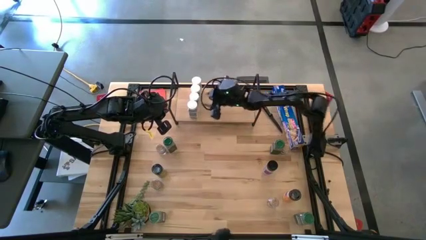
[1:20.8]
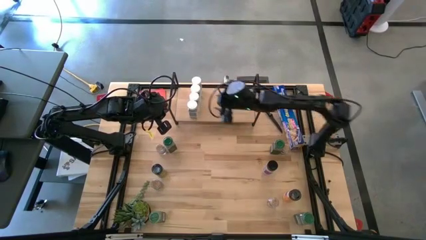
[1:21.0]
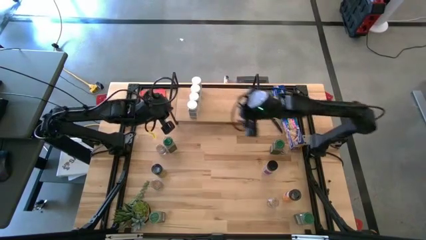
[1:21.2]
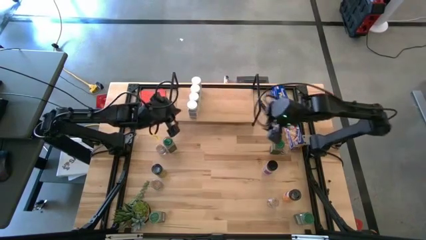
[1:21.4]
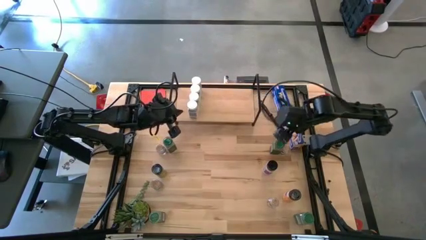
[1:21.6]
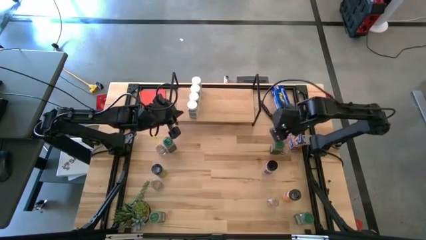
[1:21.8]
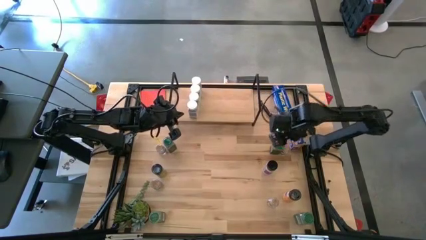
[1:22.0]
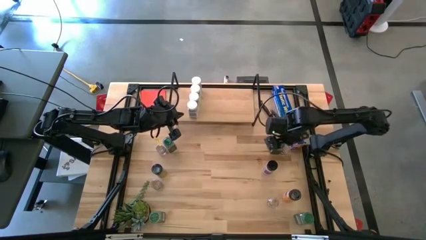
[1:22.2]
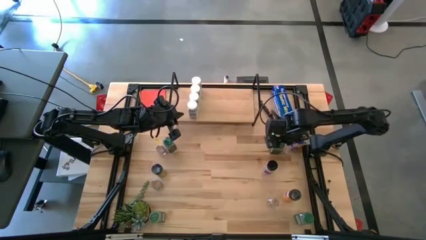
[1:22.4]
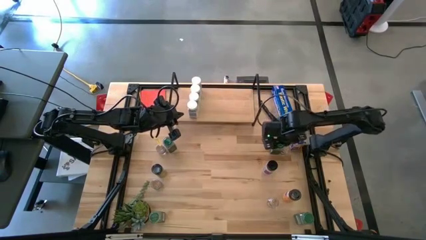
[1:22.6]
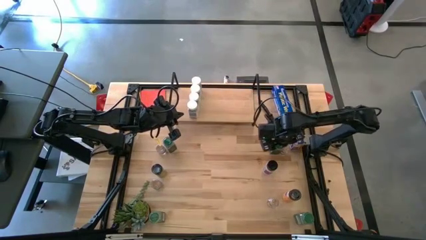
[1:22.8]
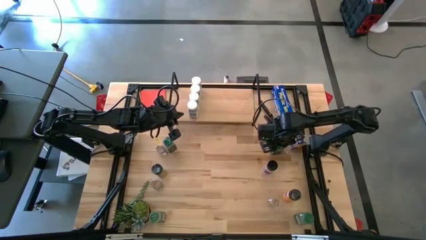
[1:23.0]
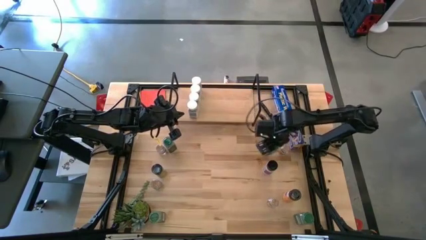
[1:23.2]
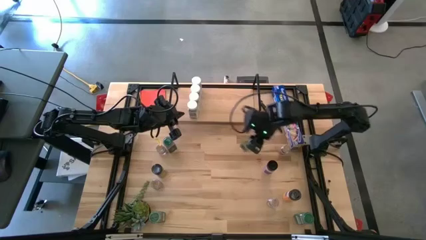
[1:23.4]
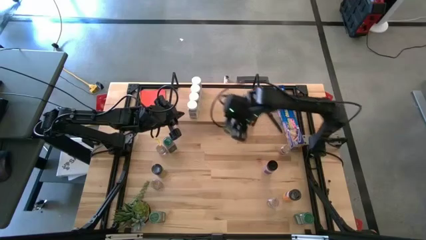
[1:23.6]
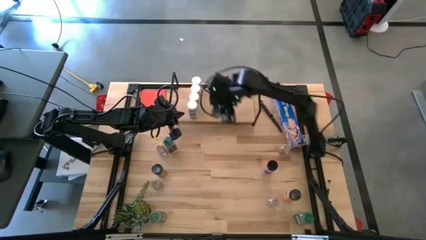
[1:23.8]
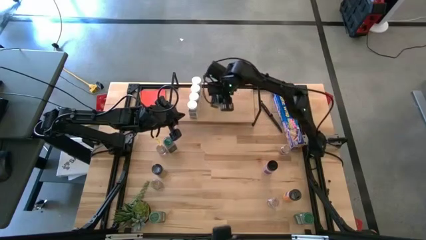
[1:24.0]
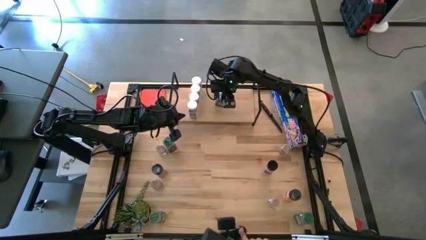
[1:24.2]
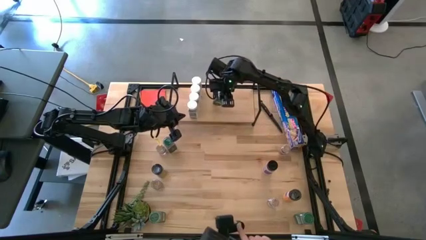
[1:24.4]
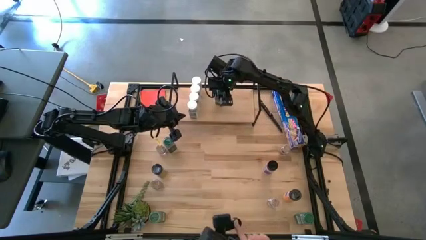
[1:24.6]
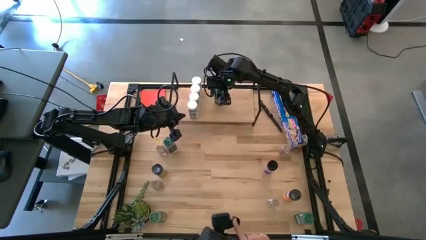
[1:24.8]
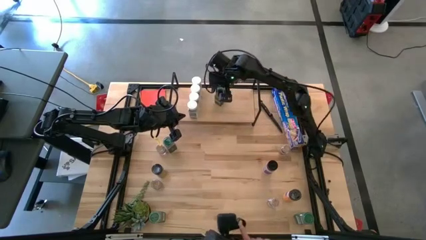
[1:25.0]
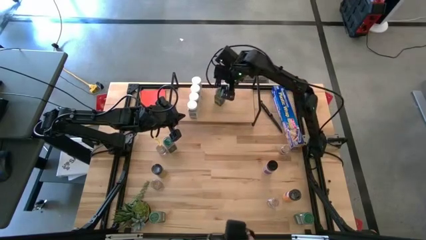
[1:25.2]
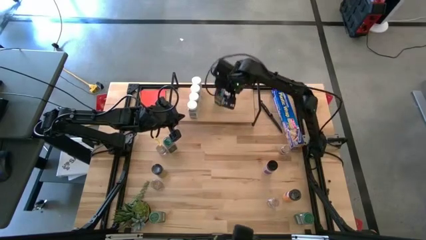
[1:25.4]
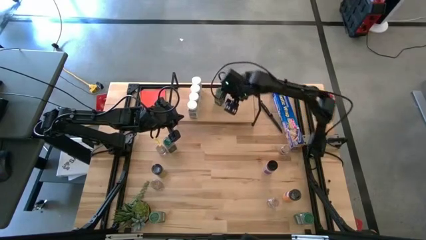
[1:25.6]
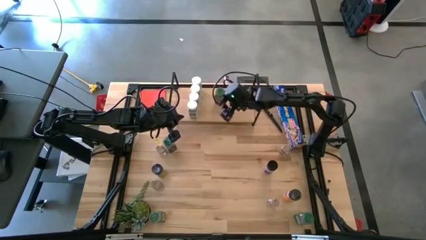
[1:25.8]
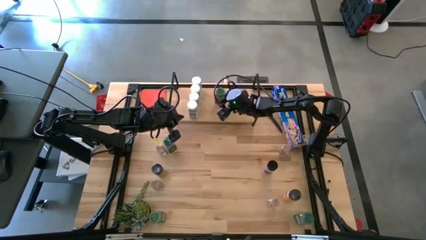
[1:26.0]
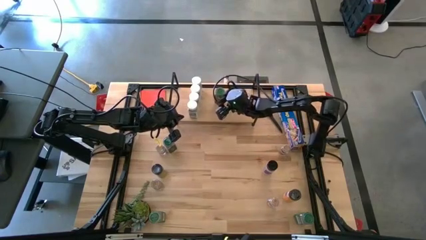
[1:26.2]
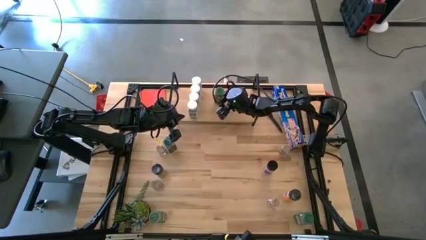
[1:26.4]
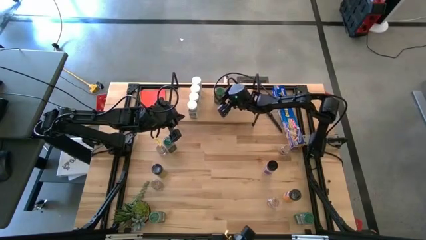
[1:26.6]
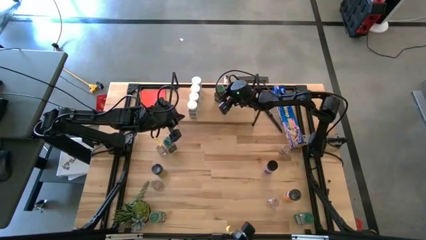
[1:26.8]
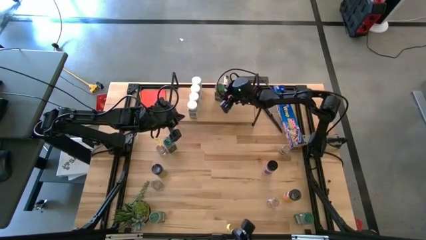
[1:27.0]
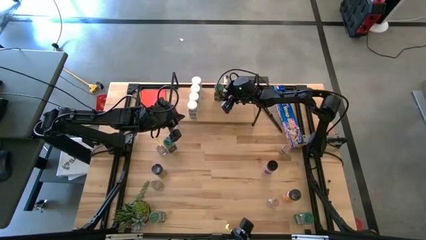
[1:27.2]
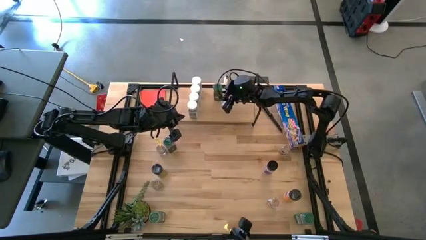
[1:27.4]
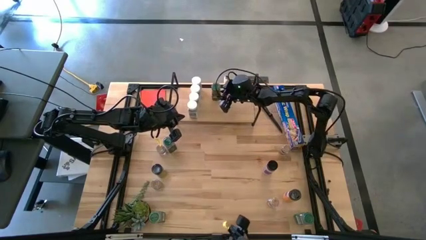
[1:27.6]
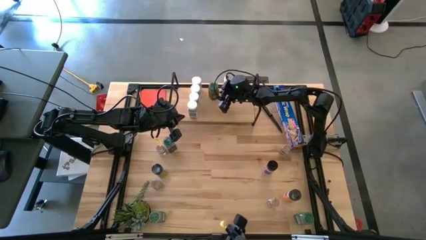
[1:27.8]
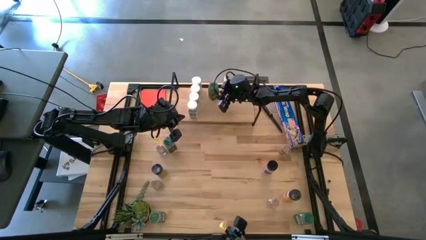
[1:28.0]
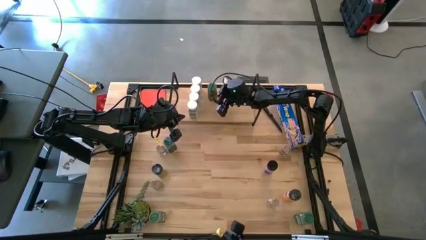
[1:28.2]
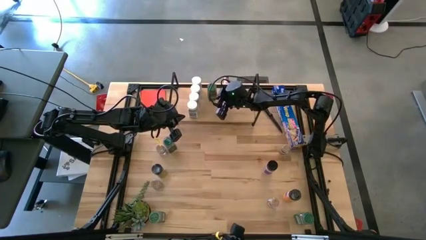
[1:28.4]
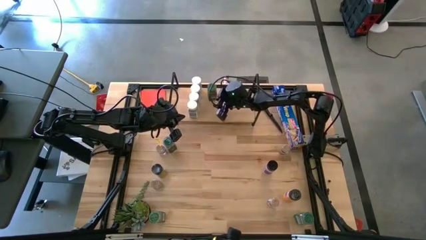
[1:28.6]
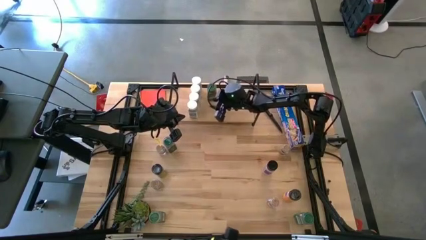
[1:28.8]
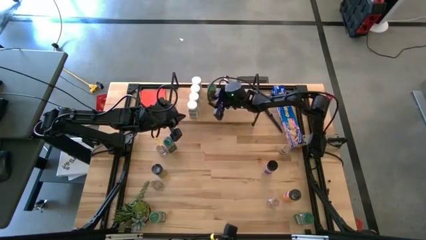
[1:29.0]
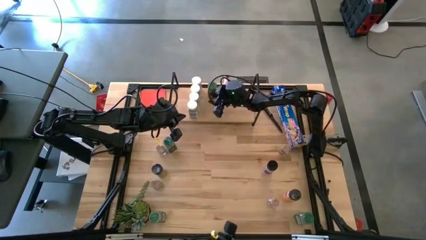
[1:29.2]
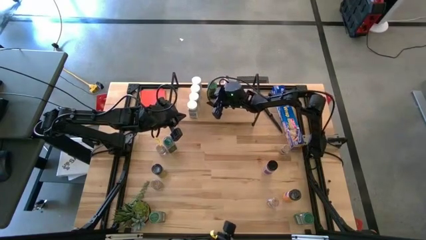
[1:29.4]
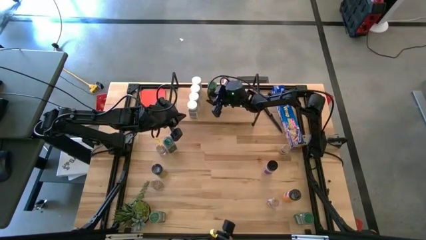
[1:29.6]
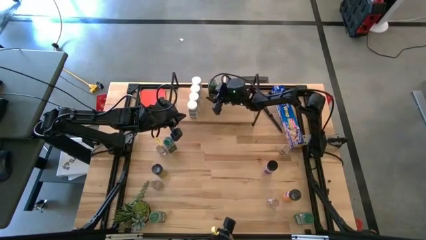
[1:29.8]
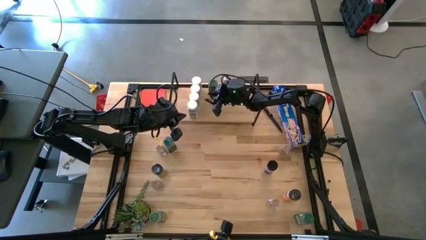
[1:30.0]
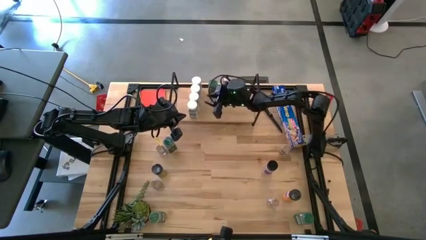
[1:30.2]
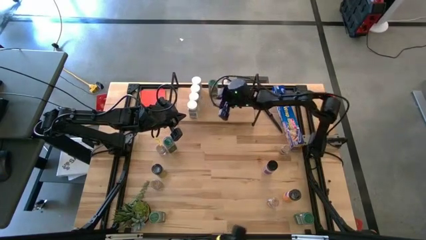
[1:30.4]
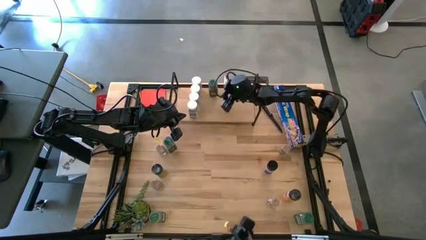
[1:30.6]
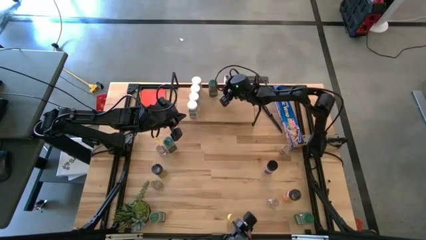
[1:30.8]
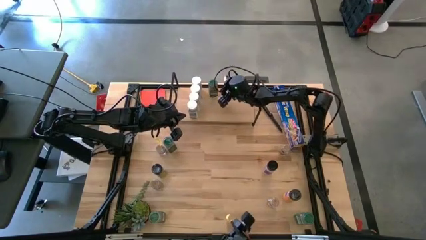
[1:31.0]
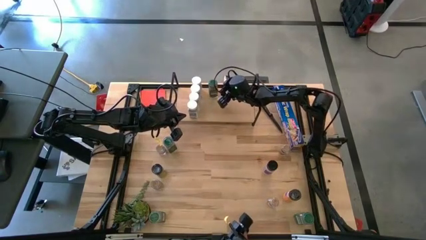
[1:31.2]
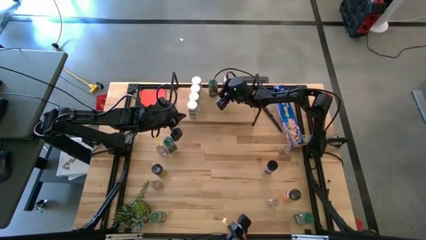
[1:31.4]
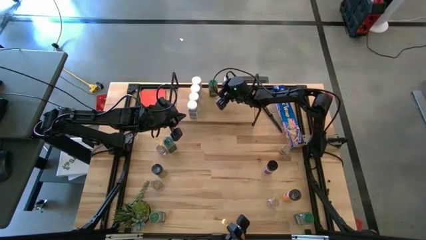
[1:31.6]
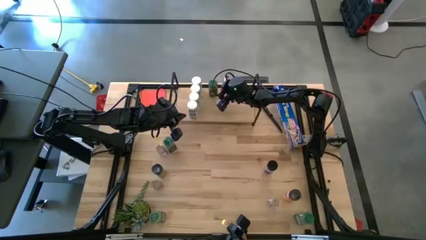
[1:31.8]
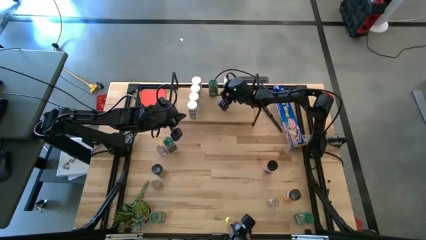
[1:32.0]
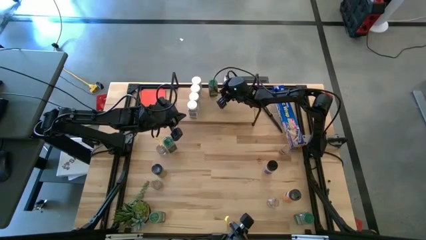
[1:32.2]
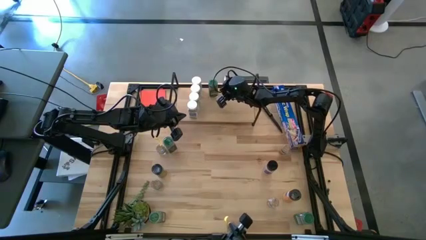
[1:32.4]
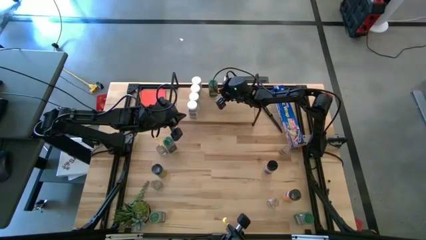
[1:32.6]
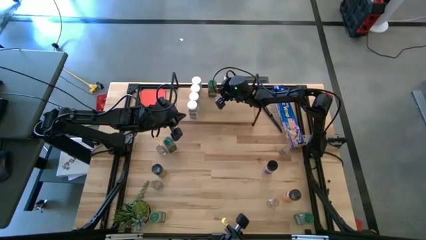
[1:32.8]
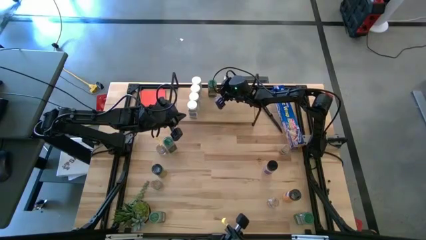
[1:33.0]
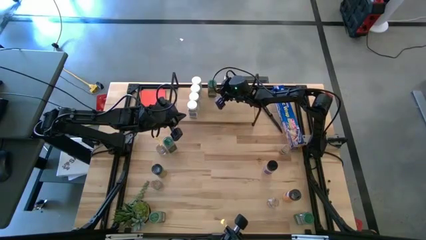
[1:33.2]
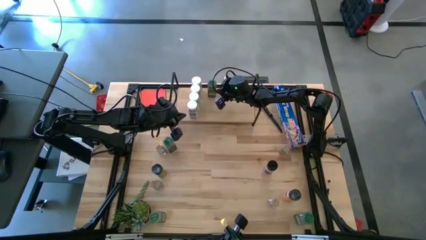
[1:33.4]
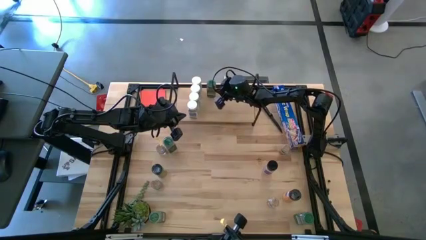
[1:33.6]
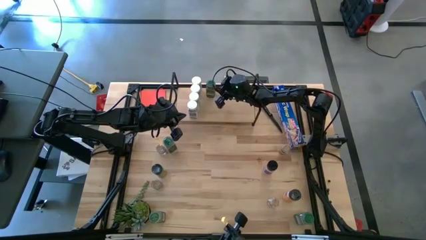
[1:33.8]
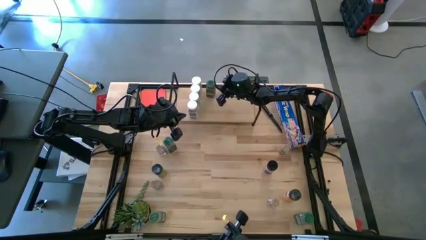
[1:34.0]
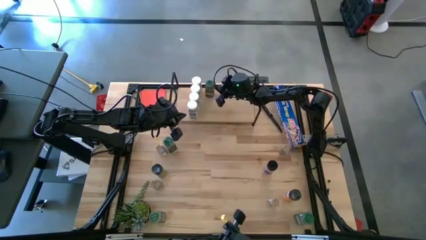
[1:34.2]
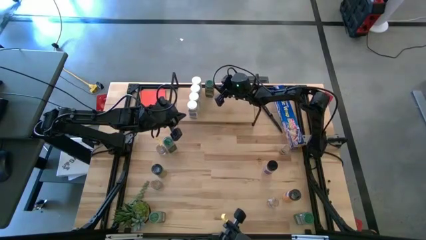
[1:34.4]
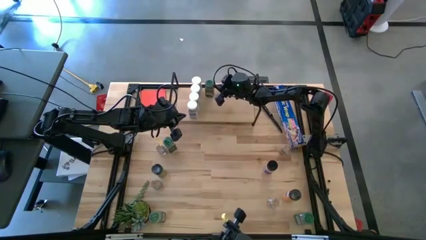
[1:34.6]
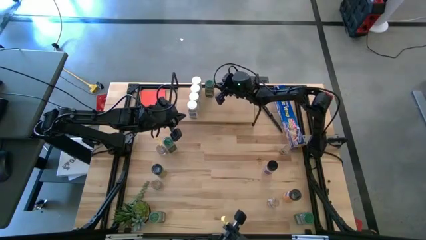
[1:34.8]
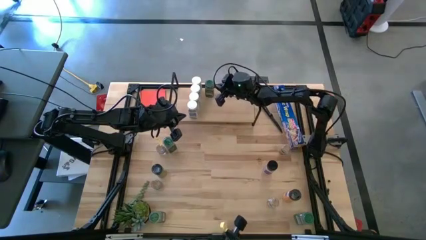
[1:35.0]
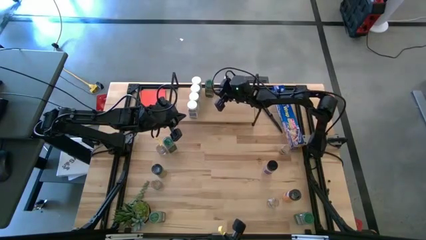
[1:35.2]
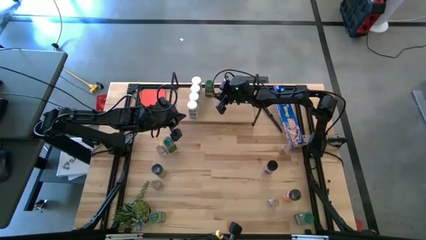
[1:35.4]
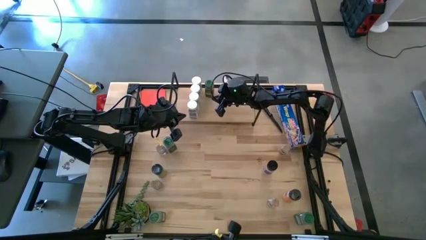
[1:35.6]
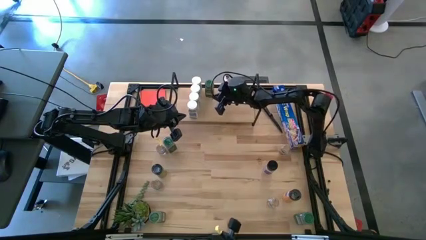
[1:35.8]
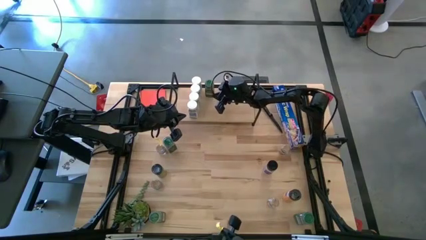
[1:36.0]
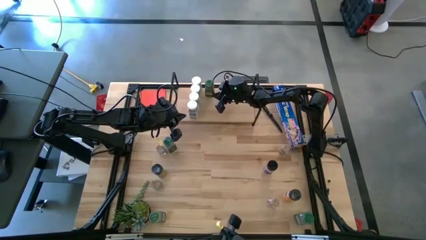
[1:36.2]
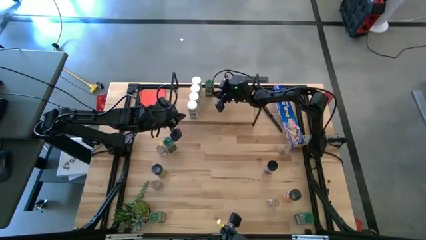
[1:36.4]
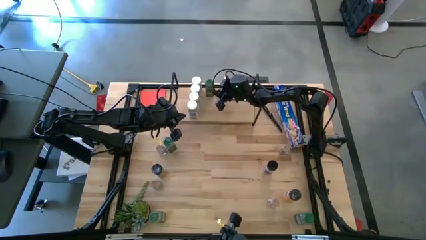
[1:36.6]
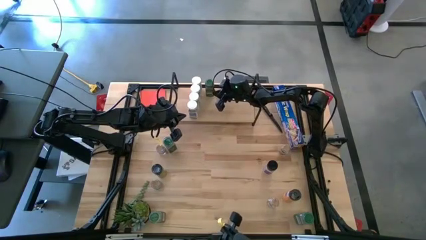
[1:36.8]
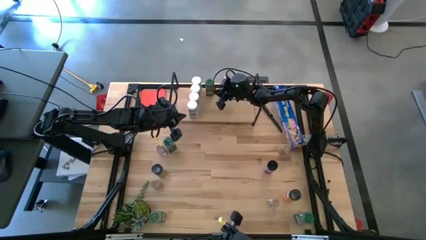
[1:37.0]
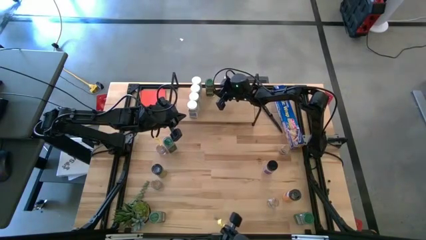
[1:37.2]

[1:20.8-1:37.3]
Task: Shelf spices
Put the top right green seasoning bottle on the shelf
